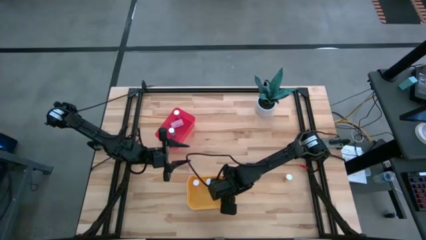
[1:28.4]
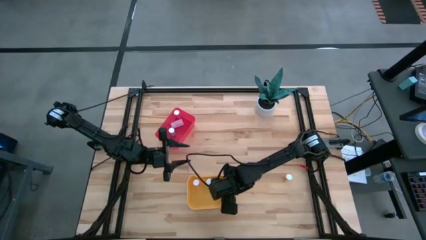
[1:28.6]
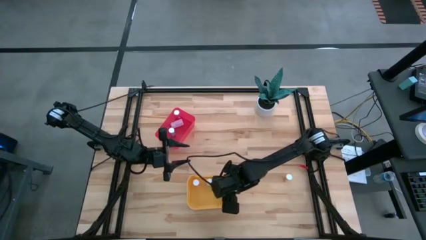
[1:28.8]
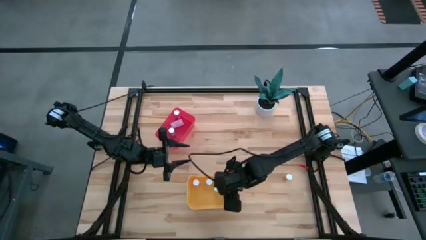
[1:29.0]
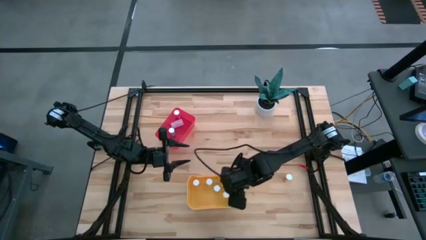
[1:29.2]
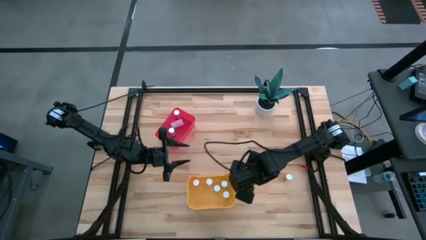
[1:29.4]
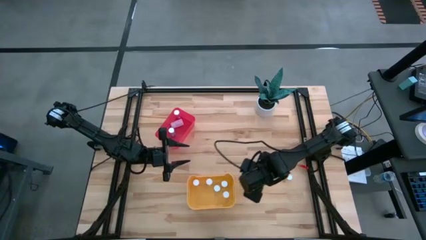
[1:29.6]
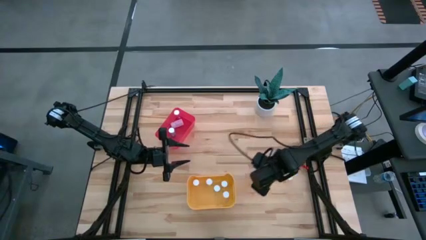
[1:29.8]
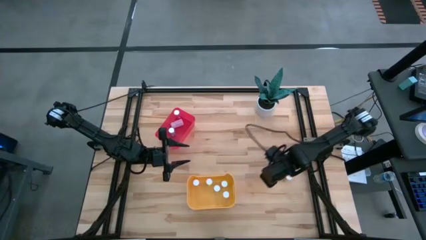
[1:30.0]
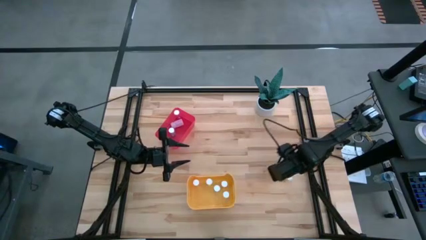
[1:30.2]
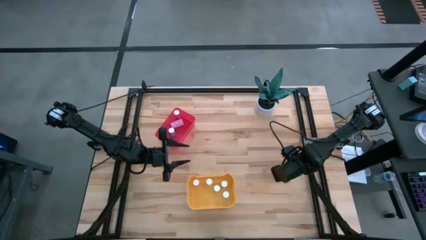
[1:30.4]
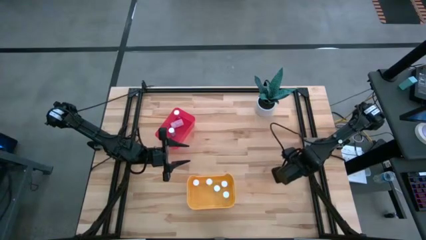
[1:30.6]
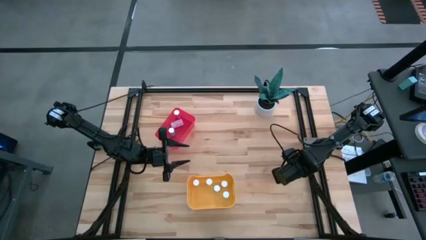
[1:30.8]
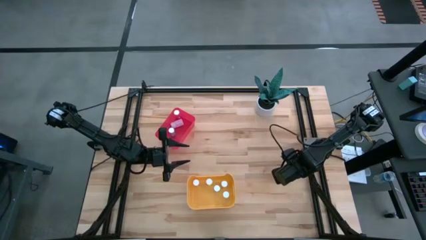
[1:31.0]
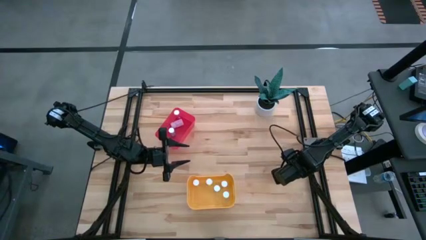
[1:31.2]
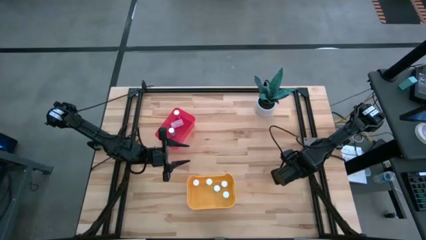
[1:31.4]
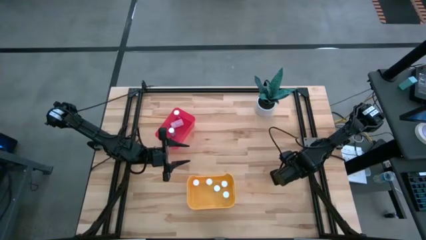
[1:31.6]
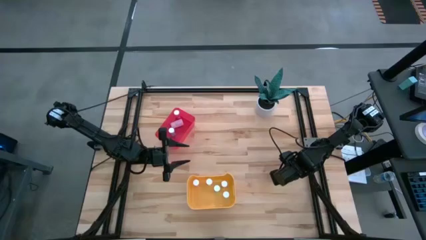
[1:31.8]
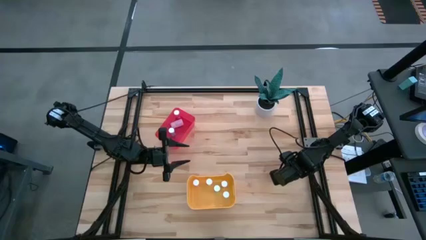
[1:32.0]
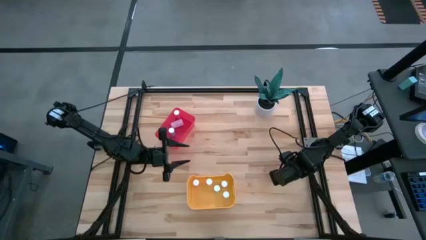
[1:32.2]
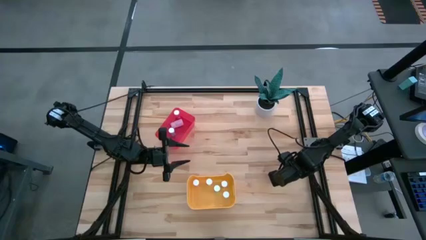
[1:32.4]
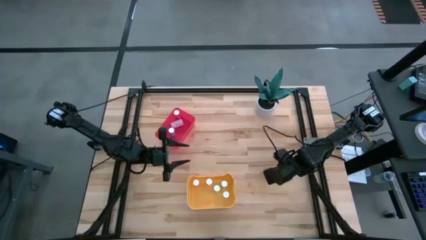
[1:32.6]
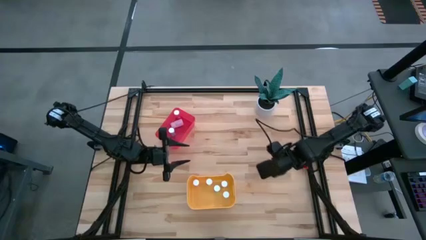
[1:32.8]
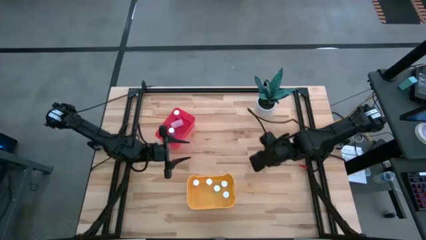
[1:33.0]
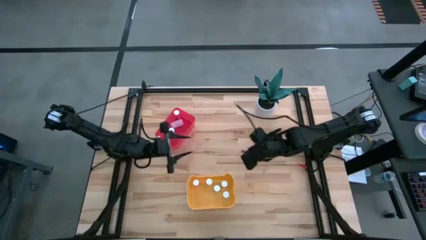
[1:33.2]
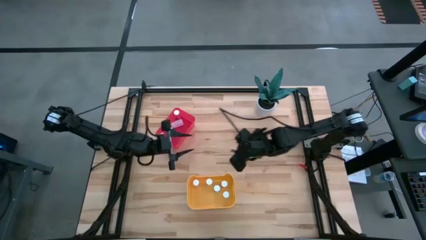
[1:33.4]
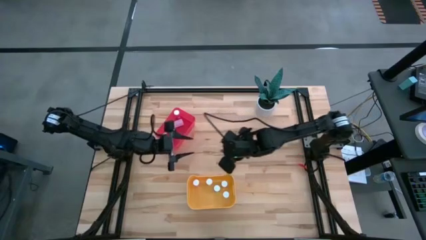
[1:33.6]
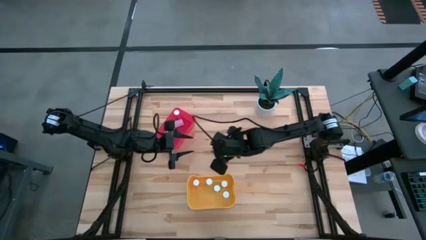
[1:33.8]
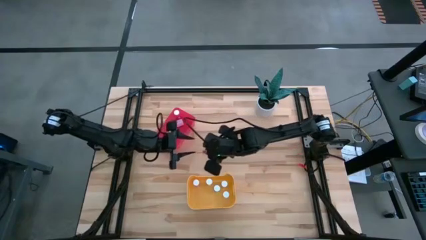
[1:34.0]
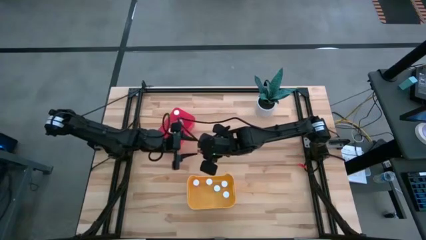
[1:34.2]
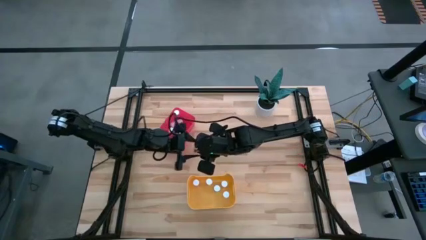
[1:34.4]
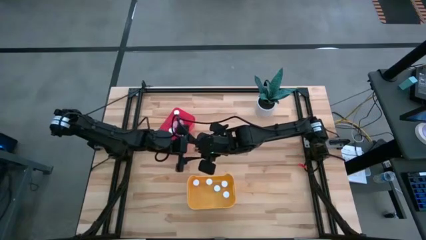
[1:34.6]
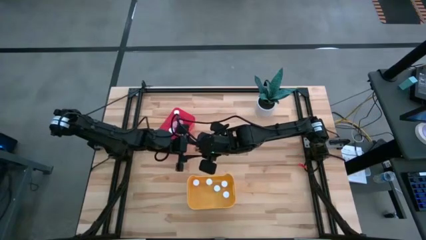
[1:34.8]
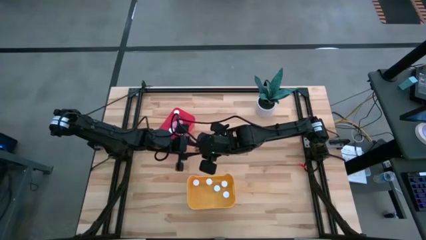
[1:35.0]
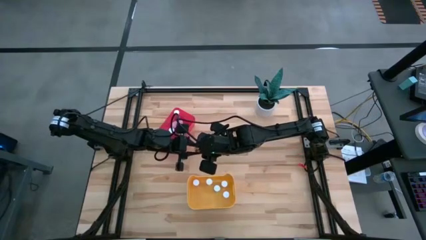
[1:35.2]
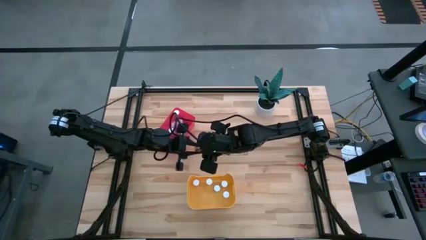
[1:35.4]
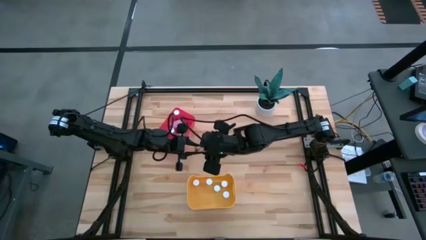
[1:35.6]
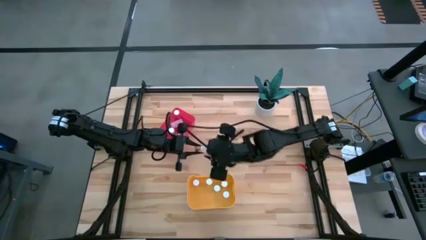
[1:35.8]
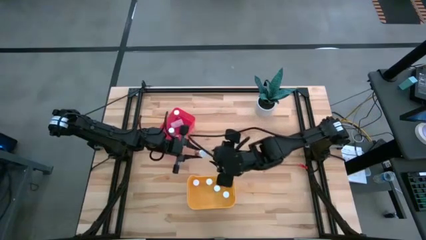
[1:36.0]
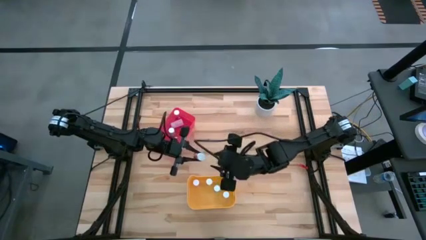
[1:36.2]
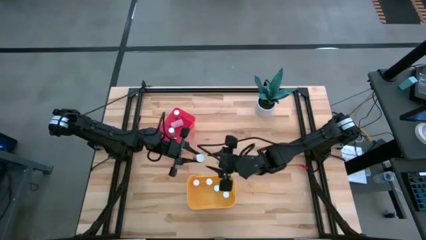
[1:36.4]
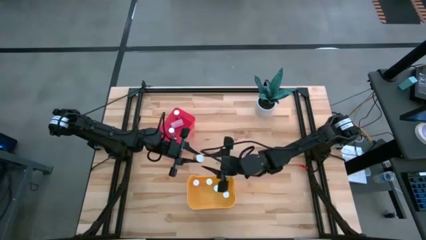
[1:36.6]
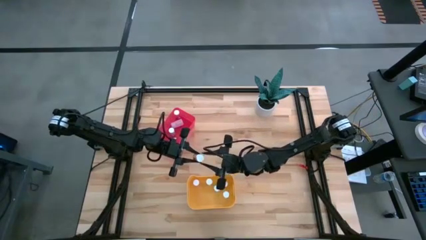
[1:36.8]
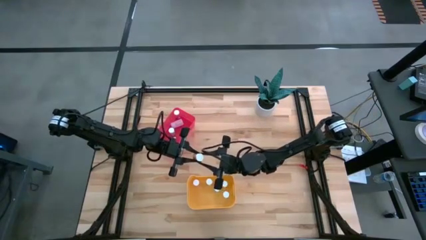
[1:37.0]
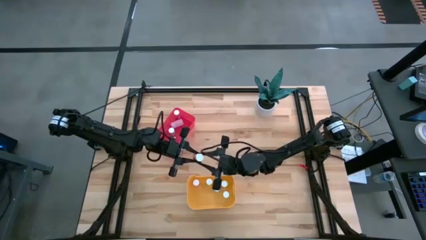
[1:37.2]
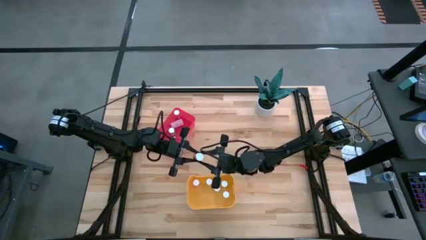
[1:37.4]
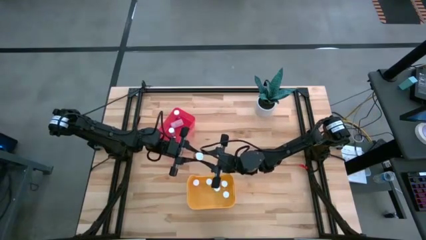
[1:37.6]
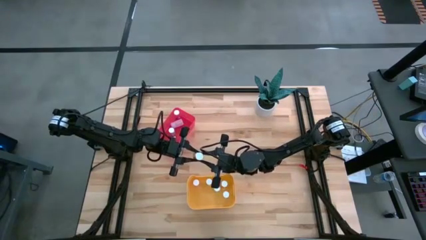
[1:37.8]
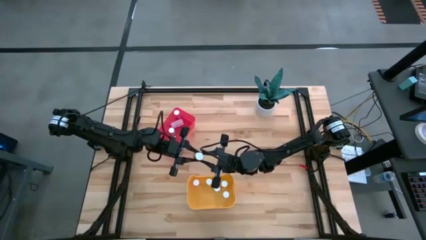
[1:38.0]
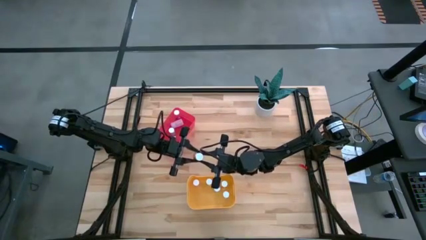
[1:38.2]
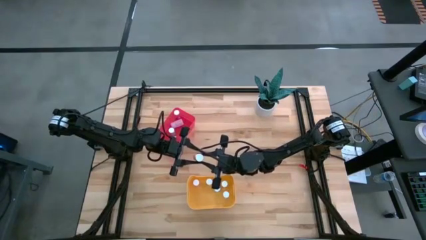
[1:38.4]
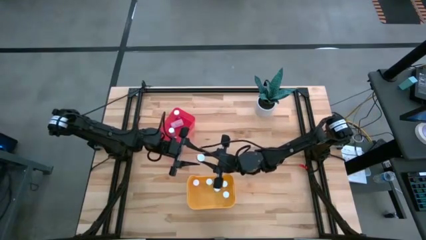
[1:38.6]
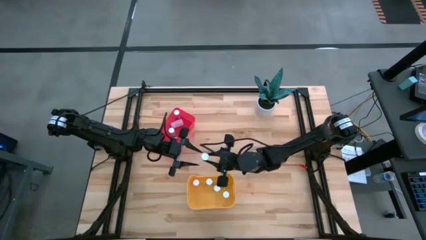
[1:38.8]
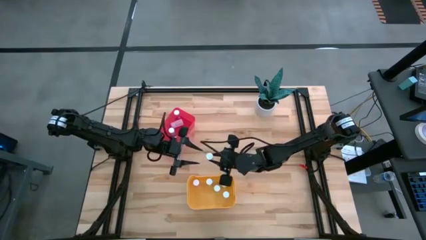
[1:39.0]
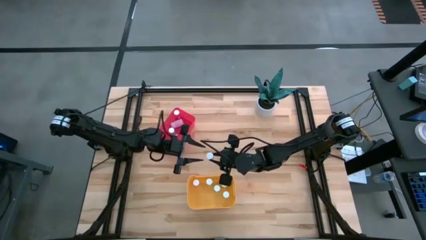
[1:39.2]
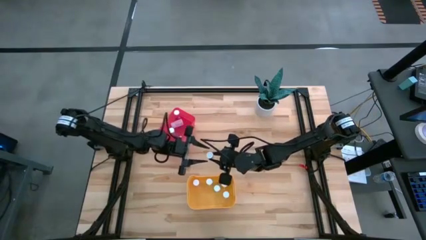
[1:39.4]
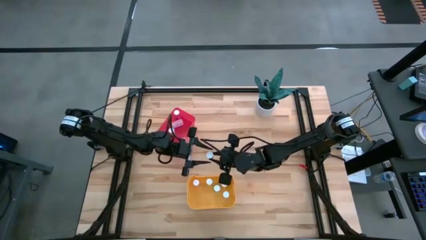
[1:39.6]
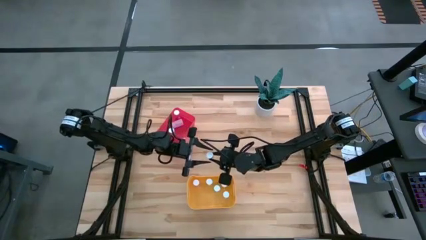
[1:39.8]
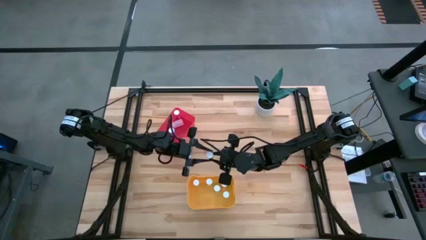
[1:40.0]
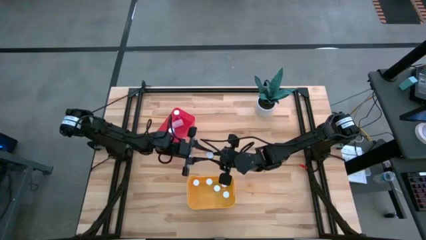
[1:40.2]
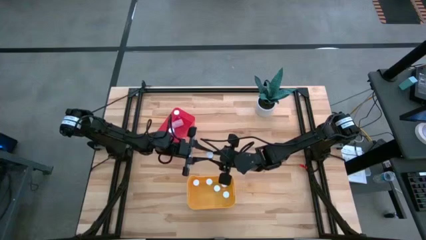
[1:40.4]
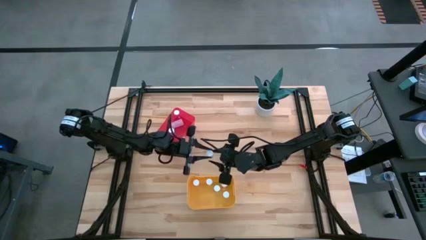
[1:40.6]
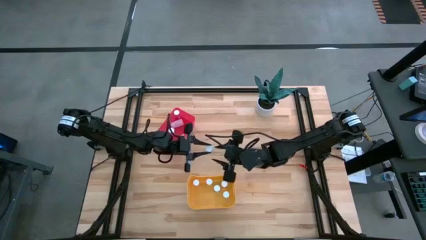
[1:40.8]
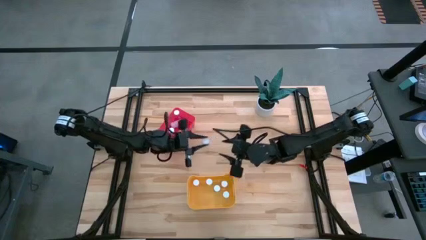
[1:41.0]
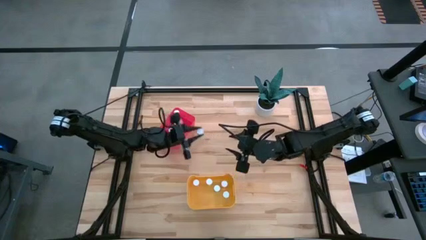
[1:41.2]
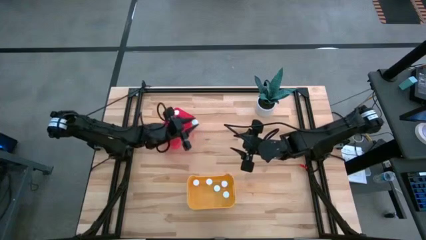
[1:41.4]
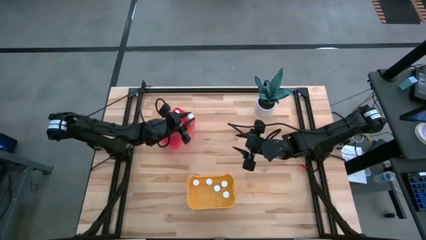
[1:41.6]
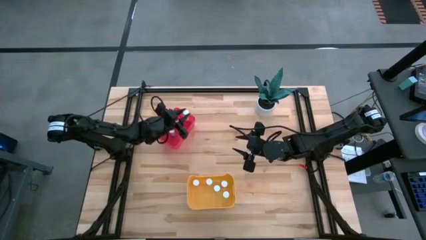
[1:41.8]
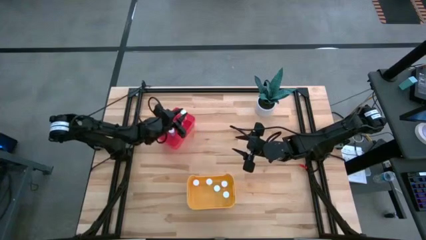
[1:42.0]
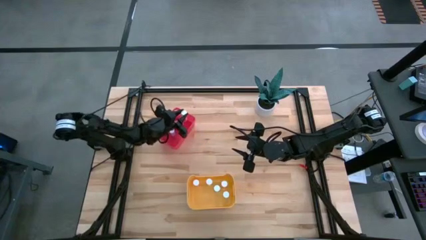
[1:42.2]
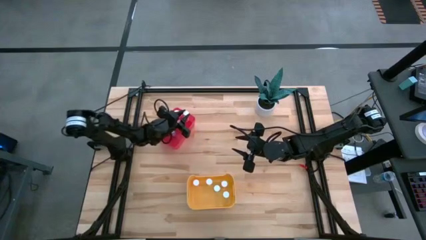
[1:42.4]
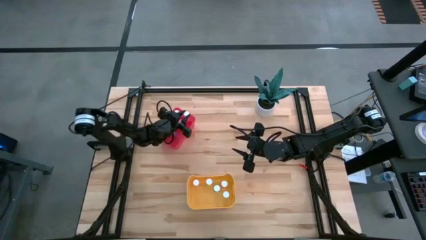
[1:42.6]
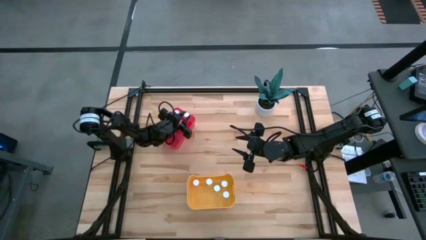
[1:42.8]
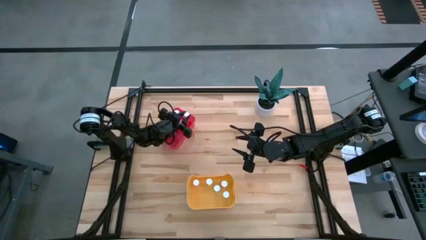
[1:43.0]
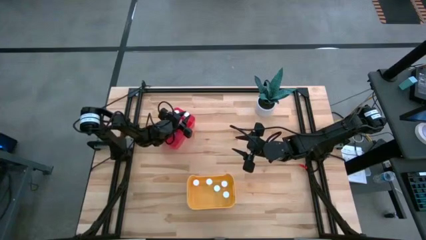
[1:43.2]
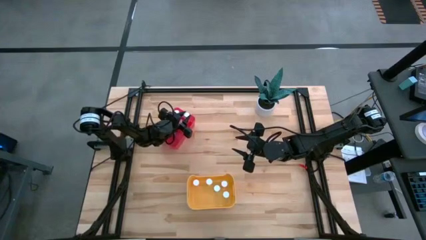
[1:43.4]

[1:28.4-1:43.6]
Task: Pick and place medicine bottles into bin by pill shape (circle, oval)
Put the yellow capsule bottle into the red bin
